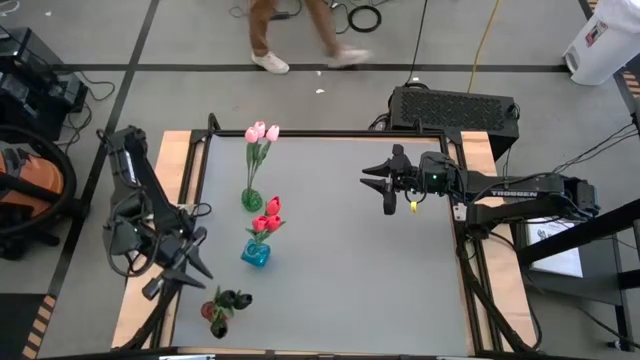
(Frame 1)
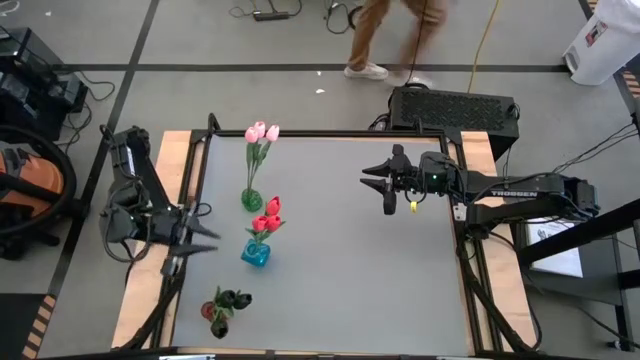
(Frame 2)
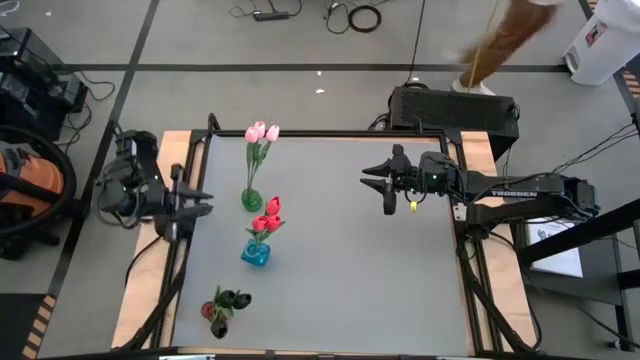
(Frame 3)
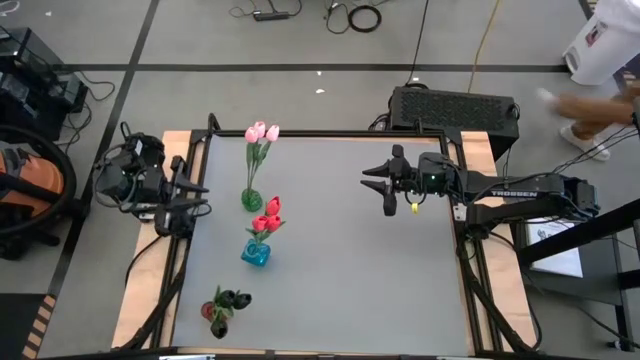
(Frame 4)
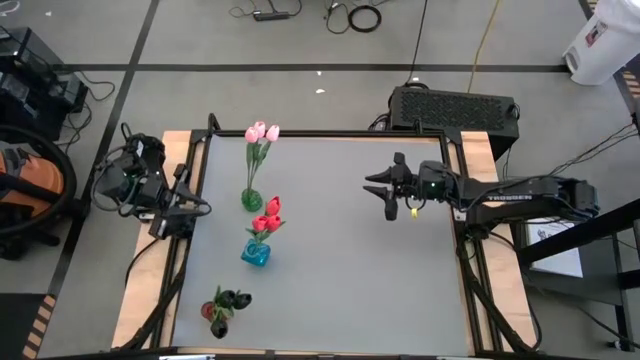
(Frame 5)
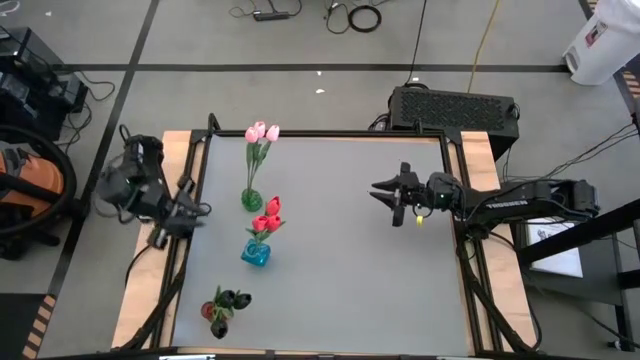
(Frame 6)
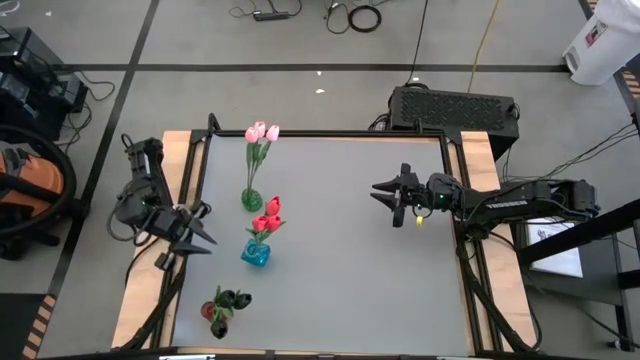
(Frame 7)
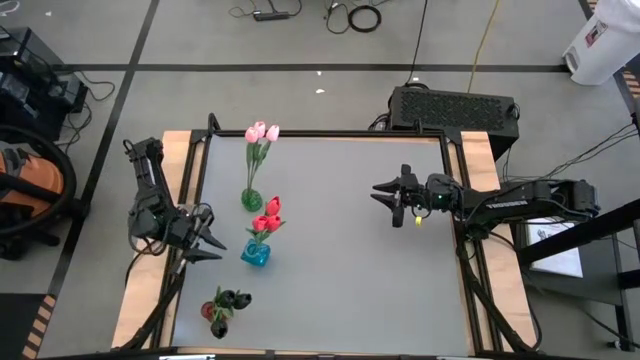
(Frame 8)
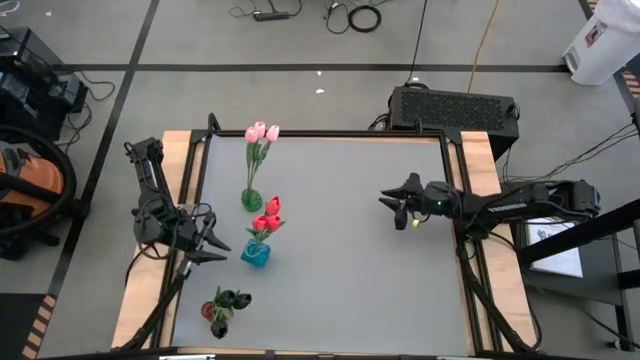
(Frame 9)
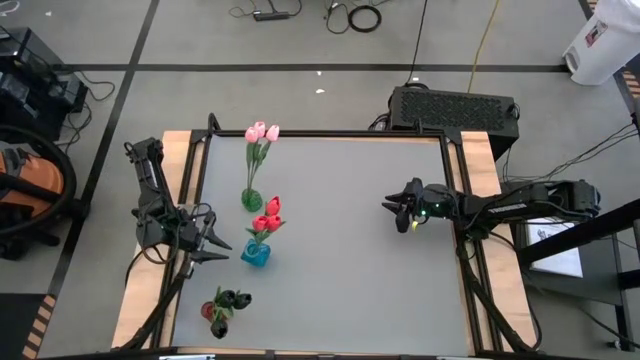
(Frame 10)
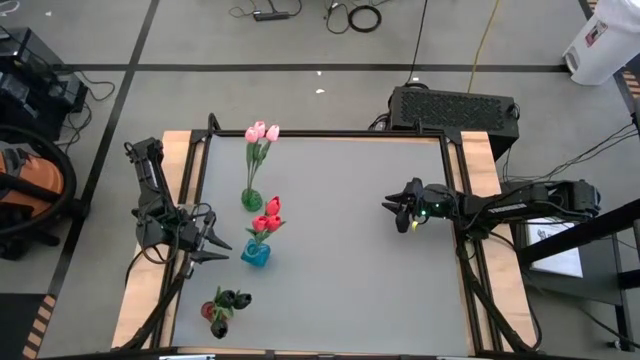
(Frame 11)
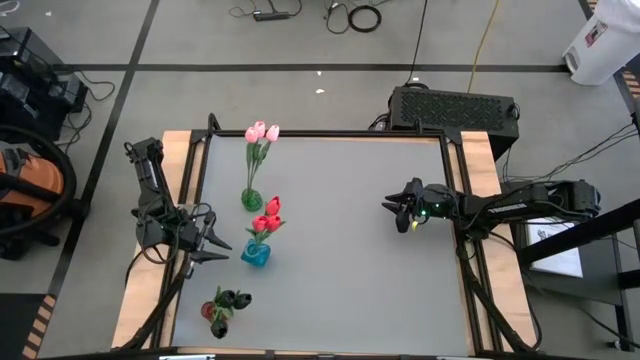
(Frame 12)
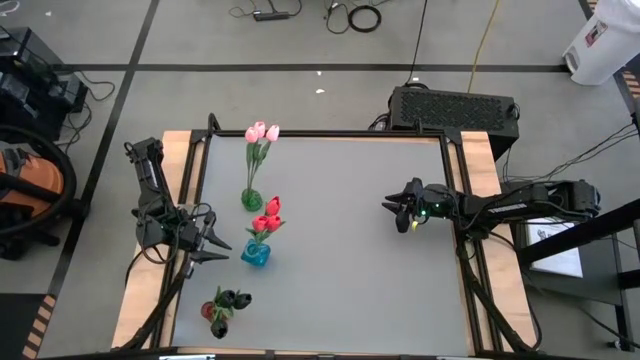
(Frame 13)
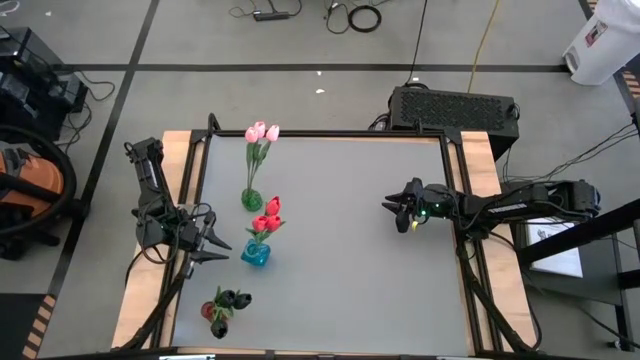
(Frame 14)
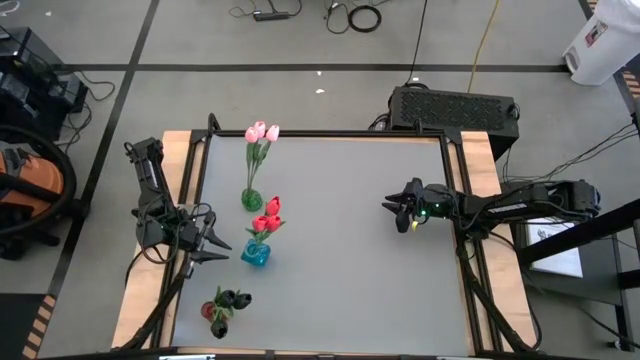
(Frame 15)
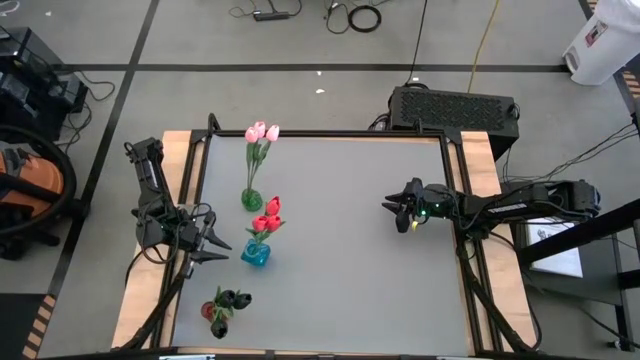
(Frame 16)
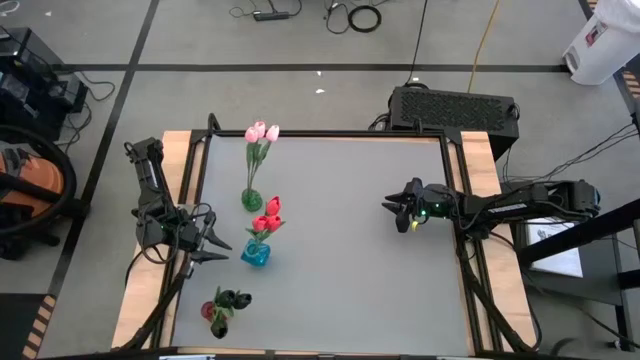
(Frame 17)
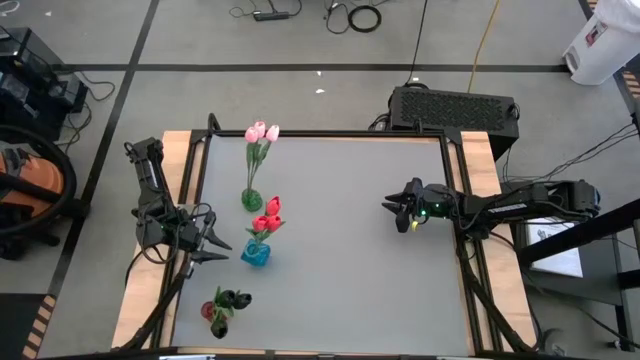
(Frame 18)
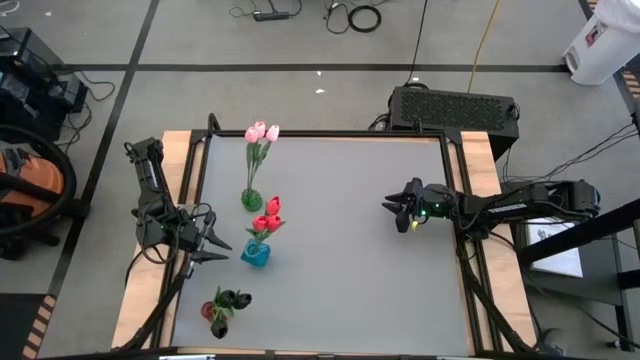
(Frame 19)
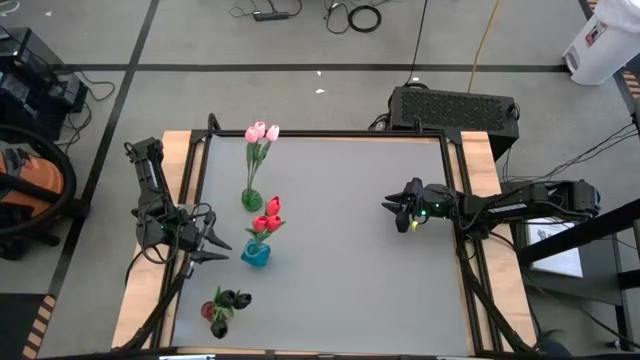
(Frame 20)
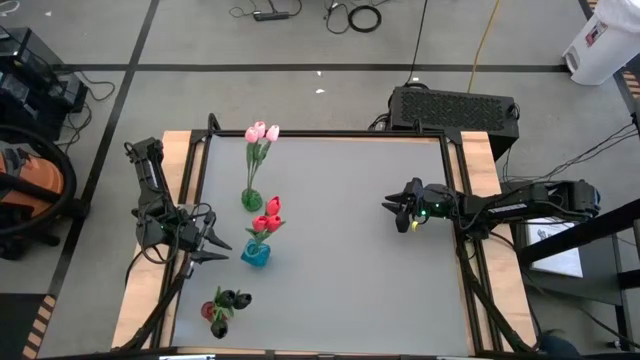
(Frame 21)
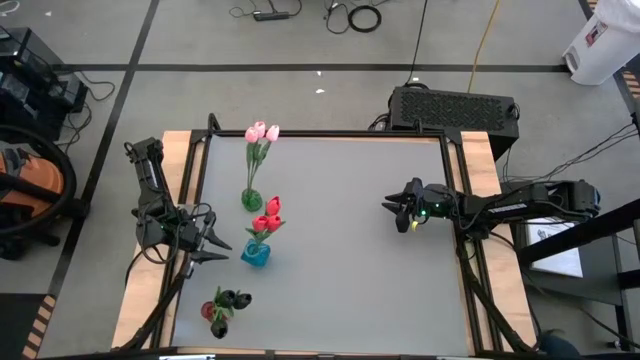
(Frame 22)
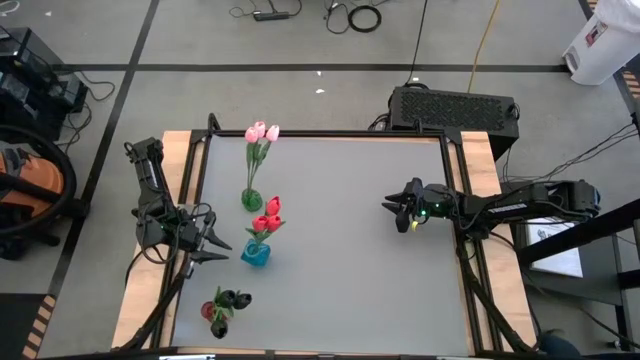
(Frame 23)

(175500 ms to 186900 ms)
Task: Sort flowers into vase by color
Return to Home Position

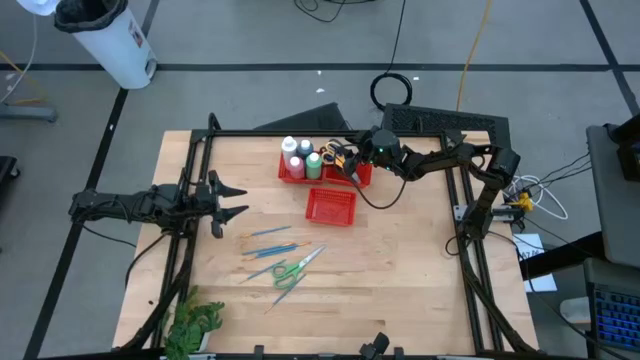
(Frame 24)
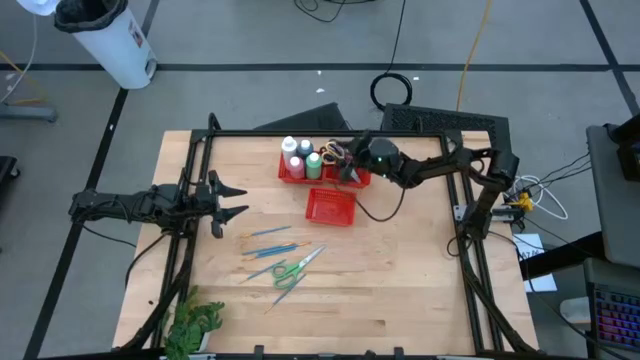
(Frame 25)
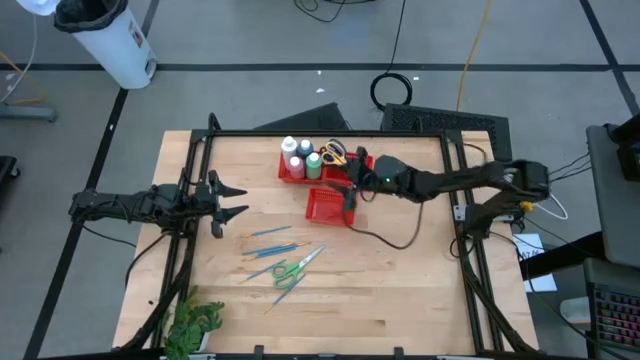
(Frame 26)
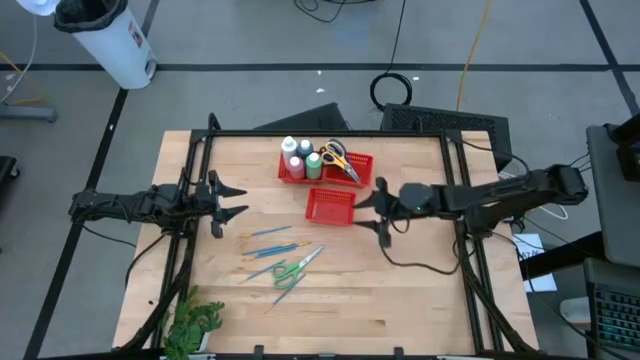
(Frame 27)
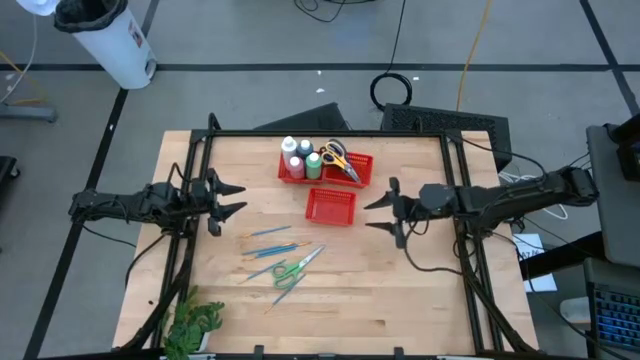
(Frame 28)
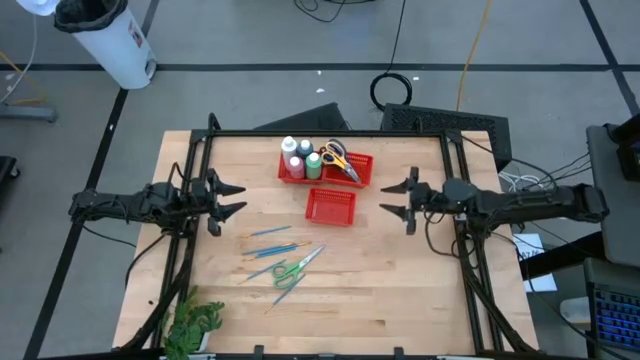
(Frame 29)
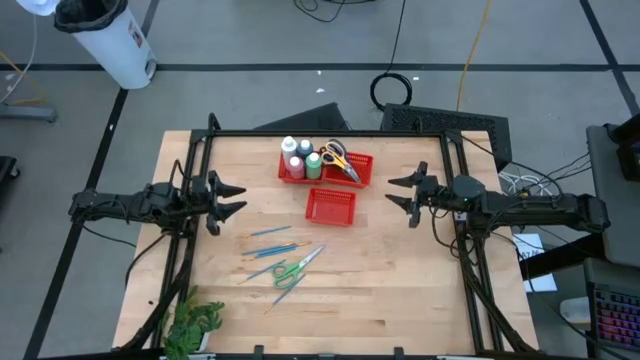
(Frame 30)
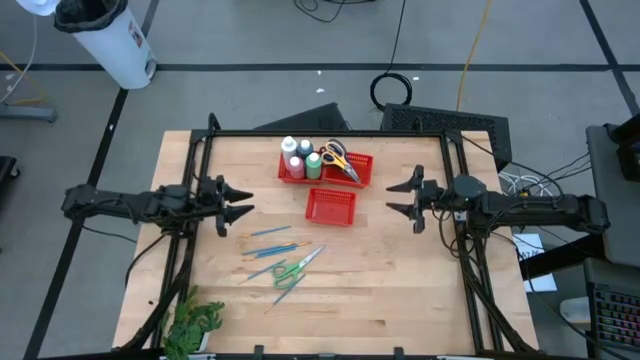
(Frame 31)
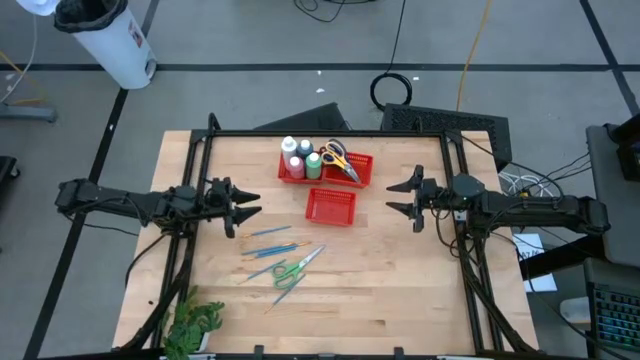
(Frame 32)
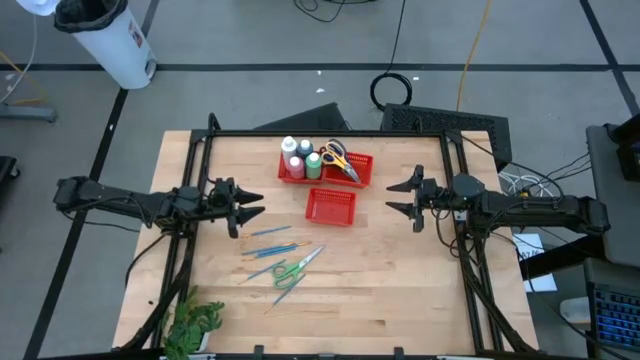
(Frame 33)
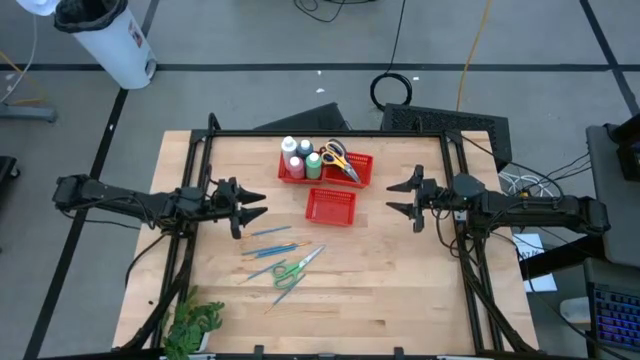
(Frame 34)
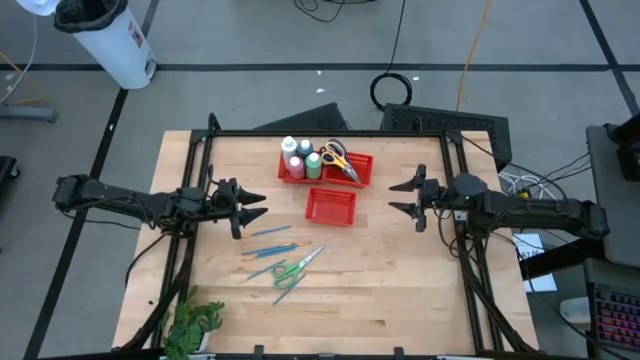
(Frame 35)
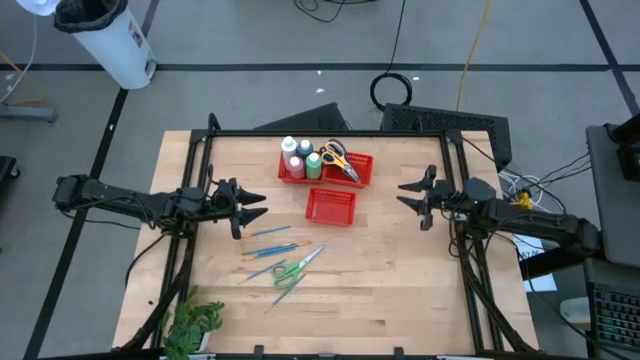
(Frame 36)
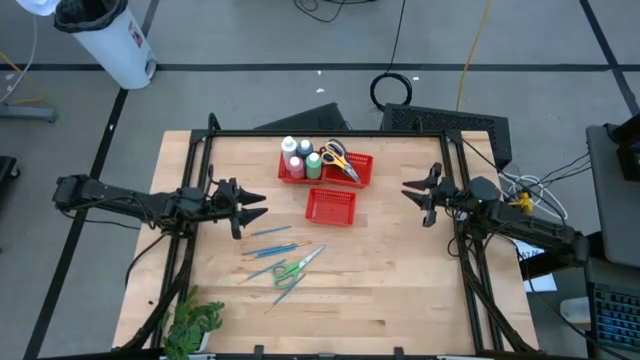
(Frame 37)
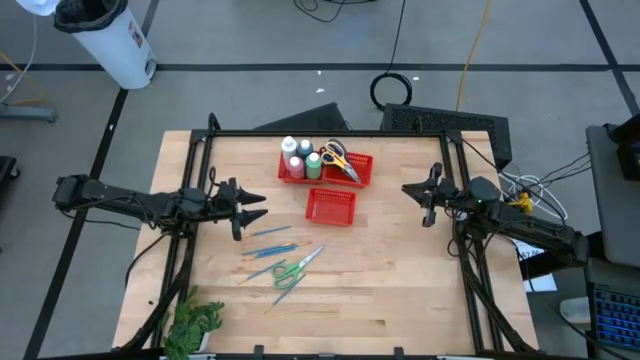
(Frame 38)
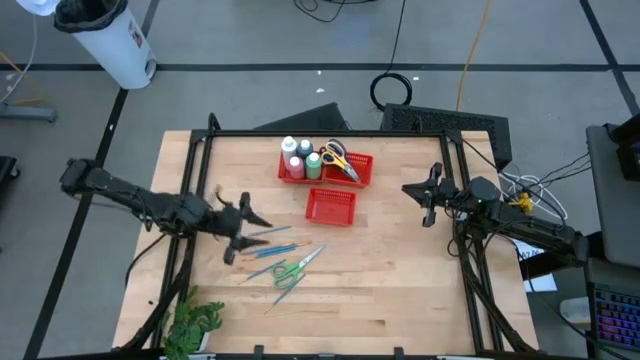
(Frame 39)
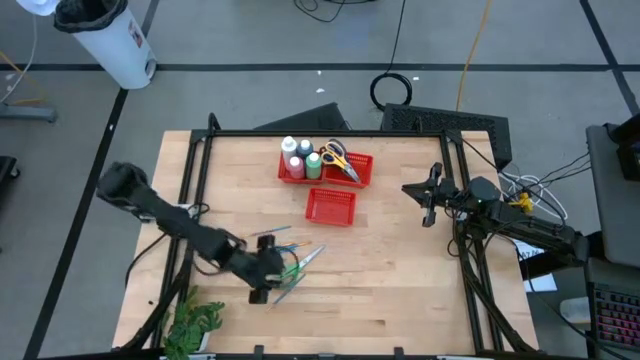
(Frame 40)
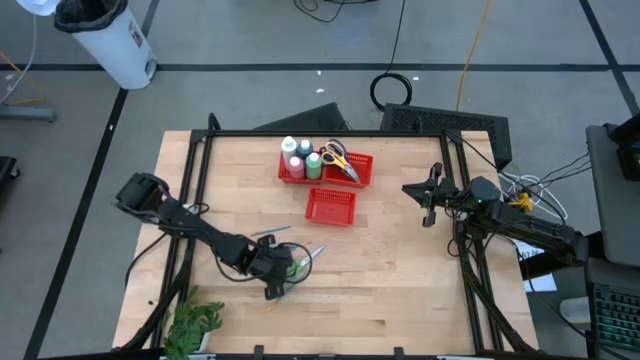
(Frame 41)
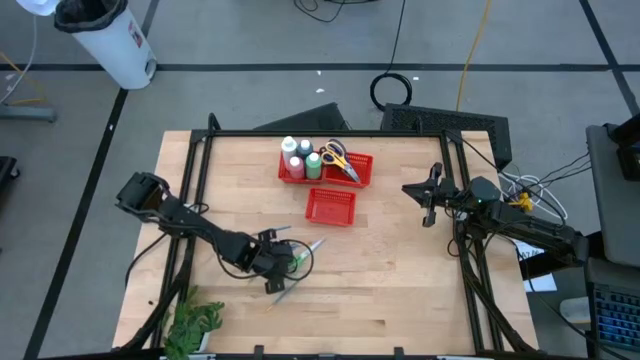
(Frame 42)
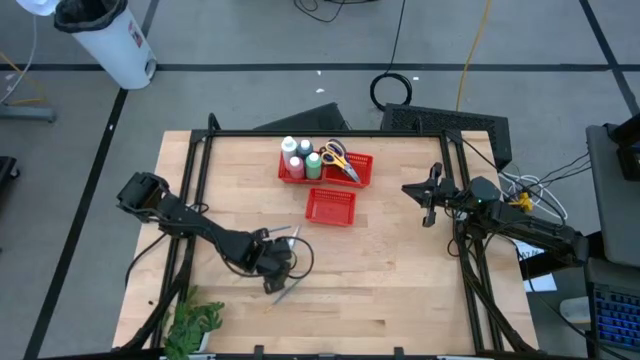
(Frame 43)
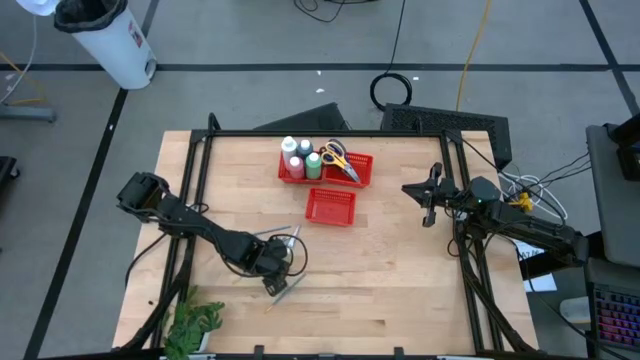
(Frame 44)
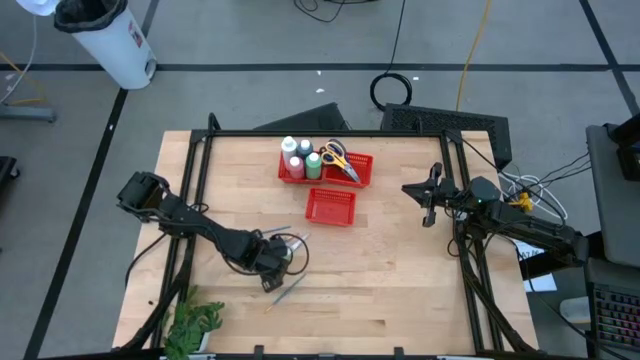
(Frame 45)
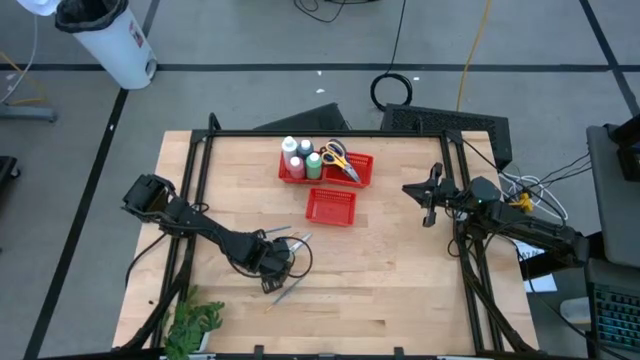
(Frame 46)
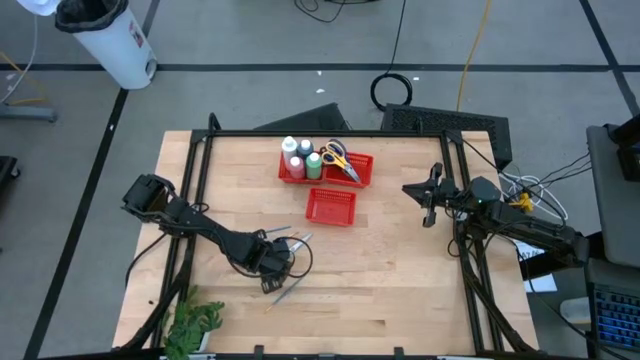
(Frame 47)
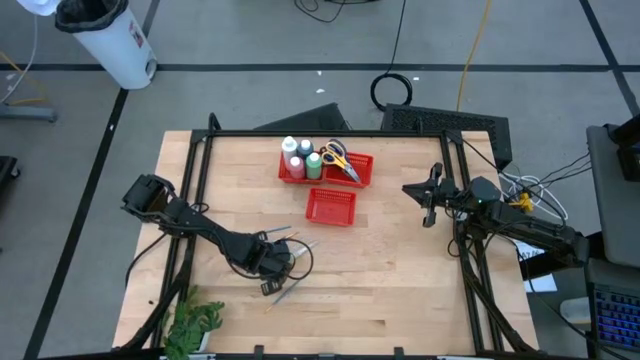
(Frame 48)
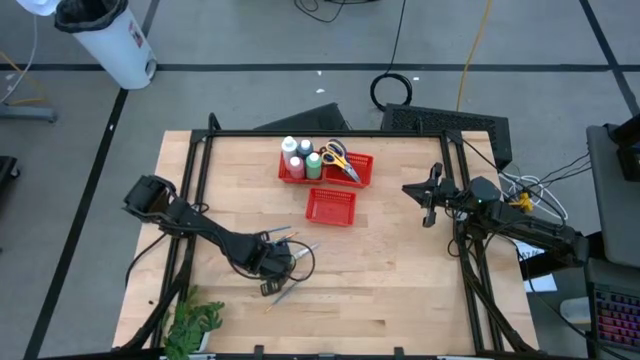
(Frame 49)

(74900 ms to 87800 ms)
Task: Pick & Place Paint Supplies
Put the green scissors into the top right red bin
